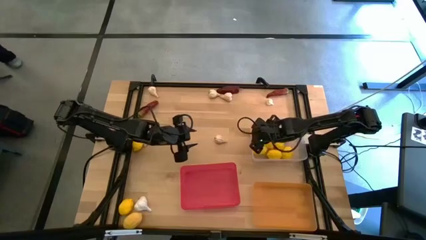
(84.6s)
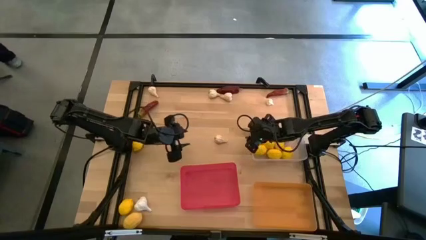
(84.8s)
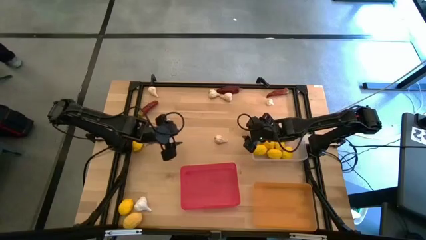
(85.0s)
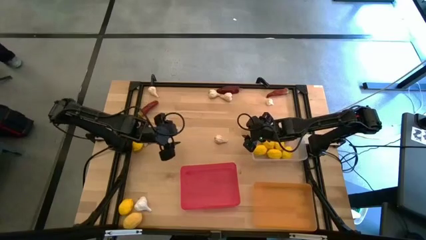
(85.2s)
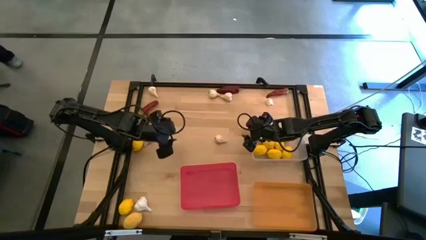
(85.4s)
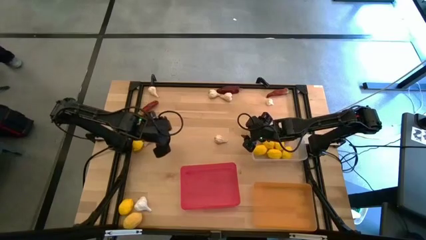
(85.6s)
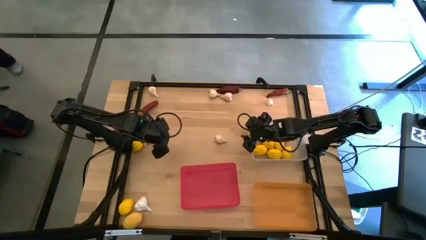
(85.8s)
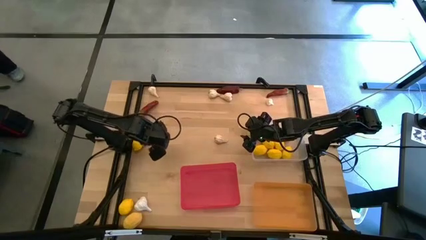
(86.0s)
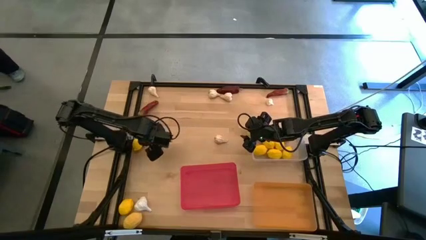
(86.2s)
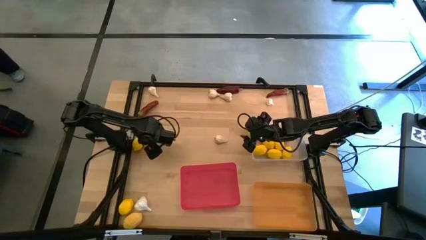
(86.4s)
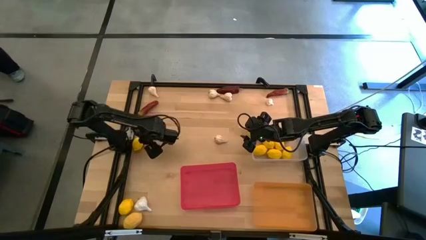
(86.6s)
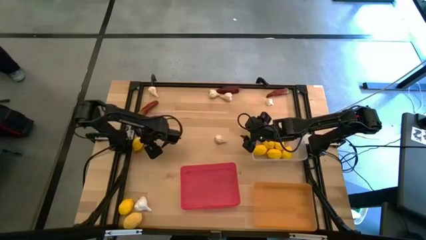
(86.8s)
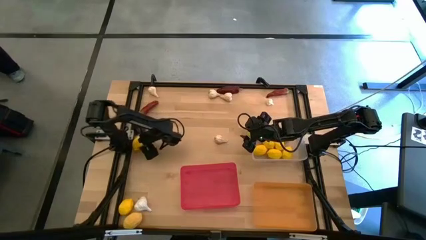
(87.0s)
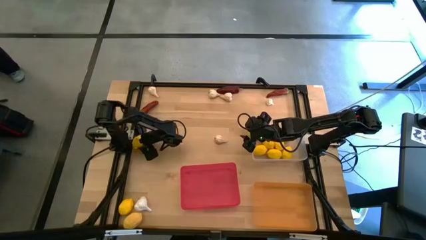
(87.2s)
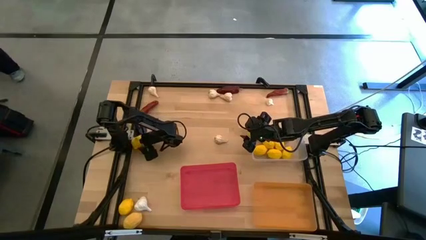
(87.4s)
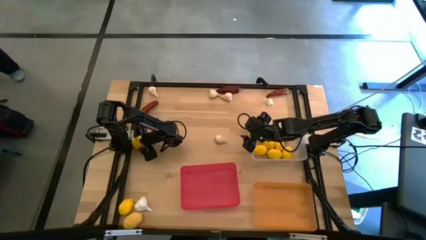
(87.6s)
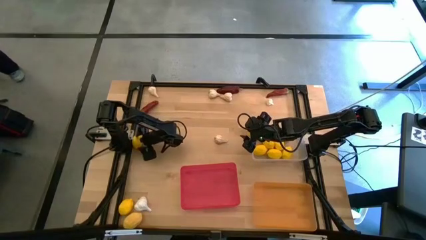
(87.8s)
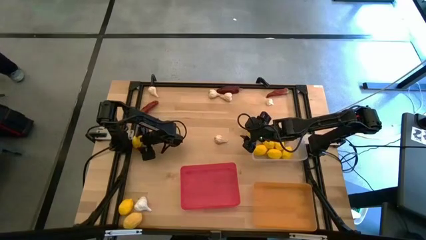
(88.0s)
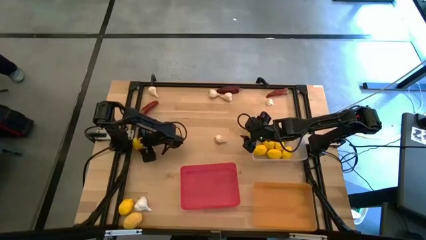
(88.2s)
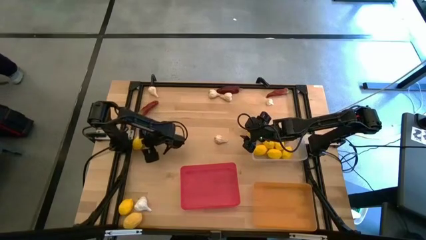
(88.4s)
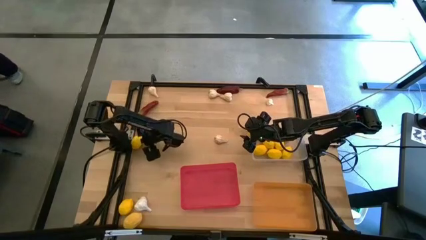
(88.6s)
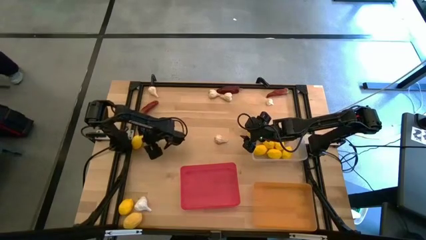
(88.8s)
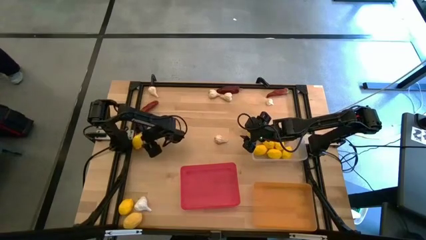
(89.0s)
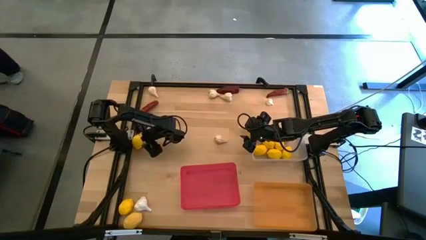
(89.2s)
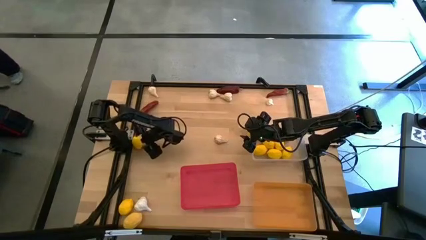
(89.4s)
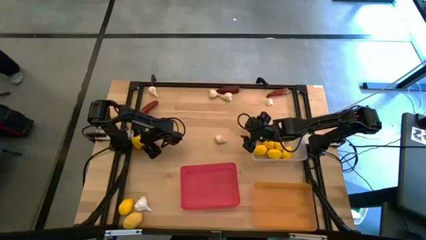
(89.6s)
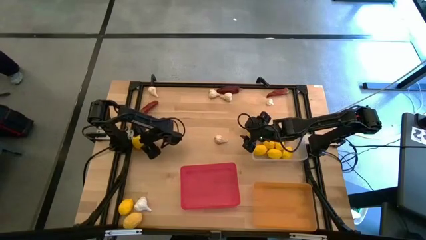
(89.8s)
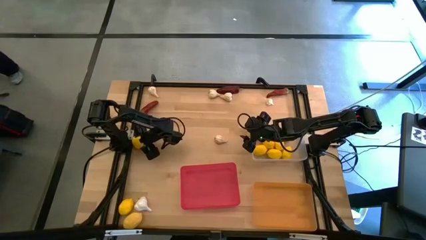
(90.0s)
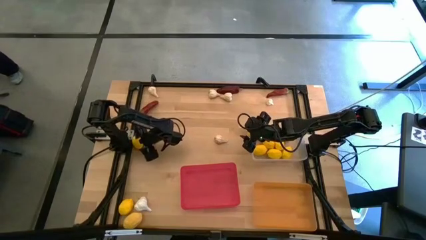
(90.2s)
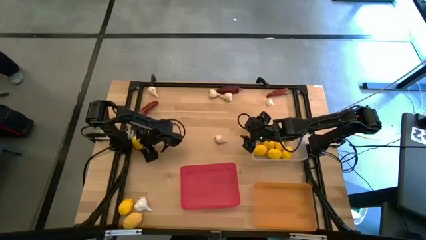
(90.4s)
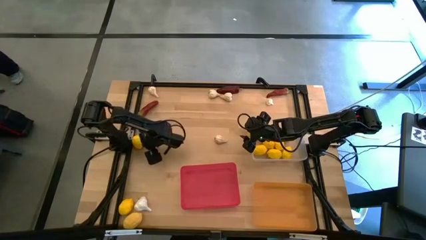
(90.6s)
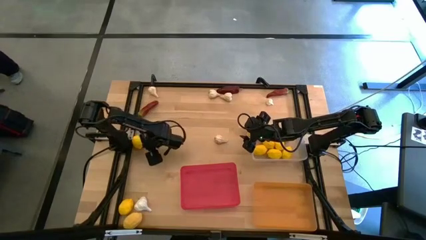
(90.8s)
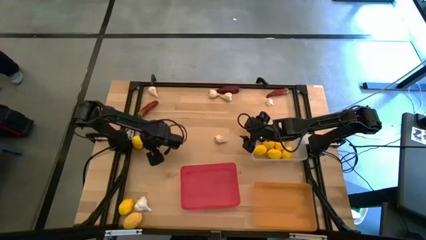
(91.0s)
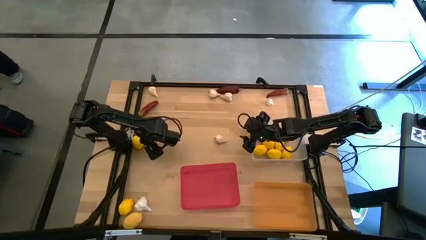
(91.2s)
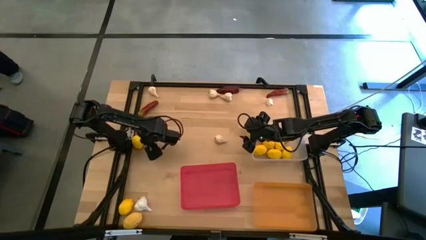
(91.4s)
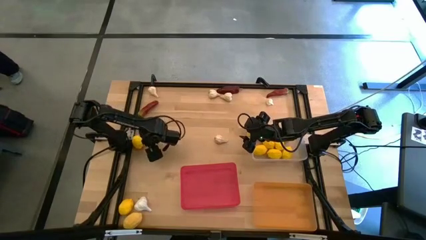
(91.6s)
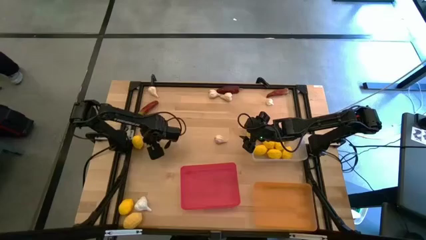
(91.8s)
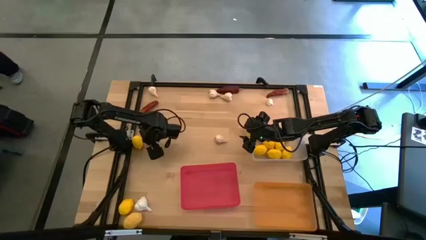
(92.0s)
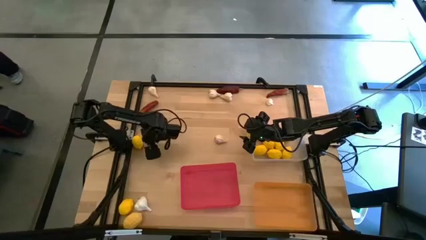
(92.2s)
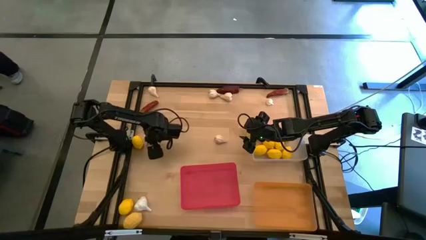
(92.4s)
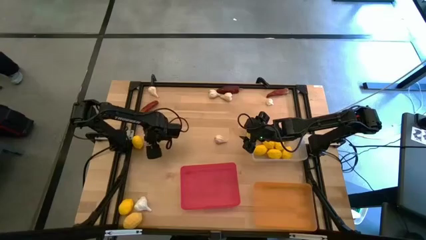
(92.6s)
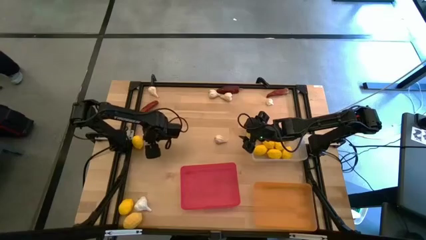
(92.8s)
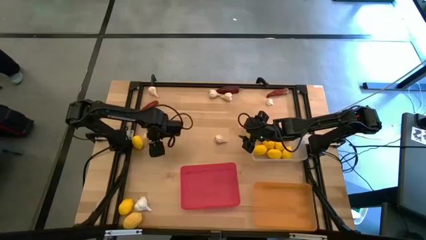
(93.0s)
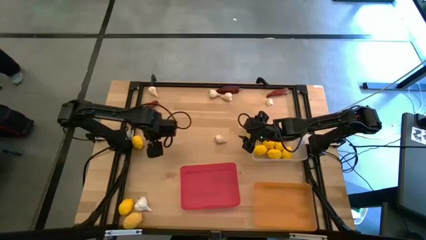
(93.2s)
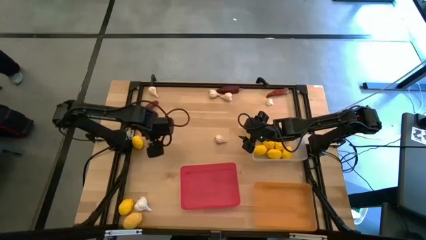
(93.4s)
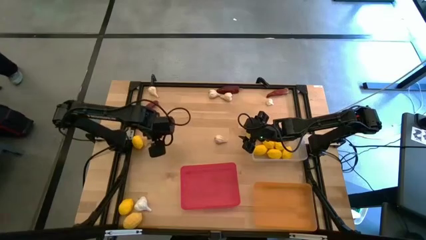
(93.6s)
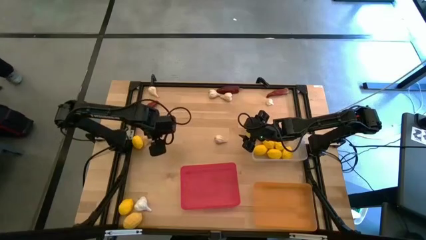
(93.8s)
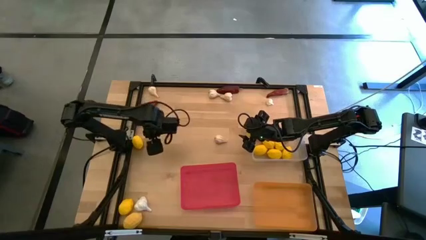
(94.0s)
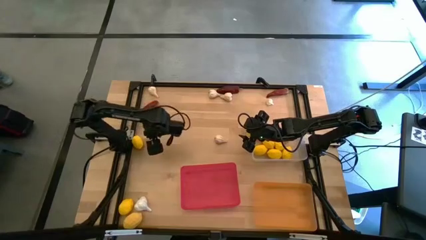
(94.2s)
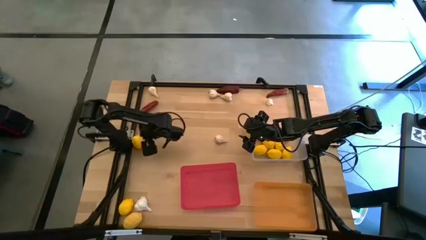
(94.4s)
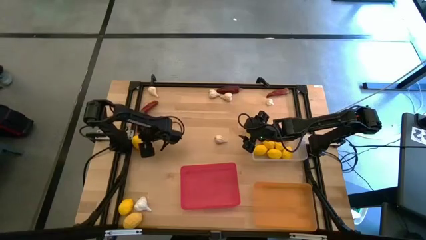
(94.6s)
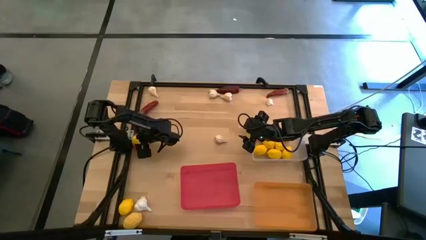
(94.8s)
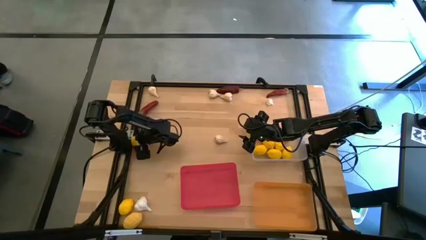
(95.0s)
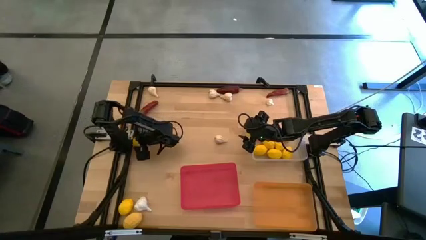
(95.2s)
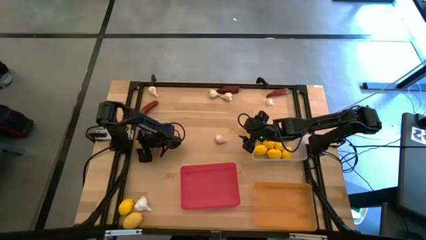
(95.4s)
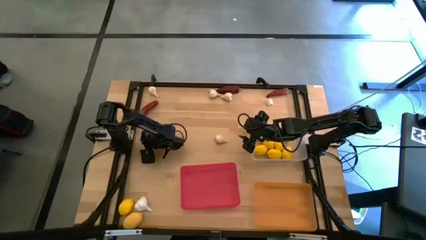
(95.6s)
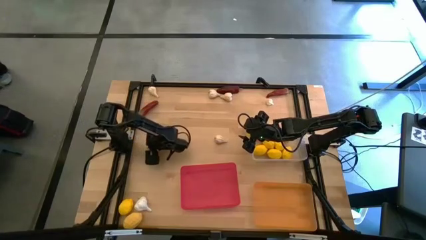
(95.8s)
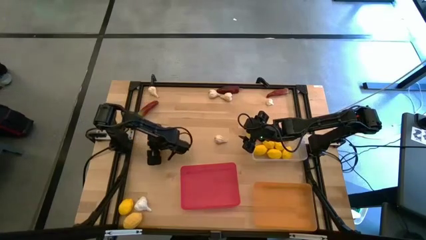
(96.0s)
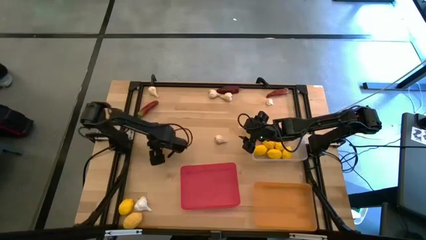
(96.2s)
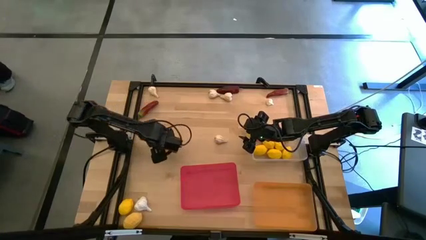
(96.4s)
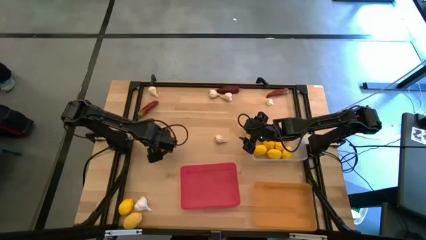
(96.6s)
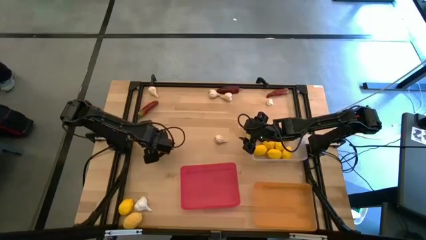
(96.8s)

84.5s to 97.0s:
Task: Sort produce into baskets
Put the yellow lemon into the transparent bin

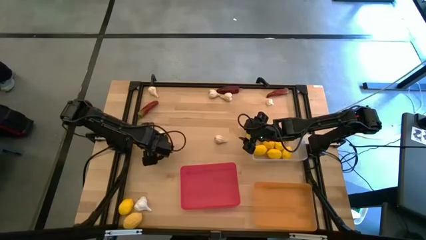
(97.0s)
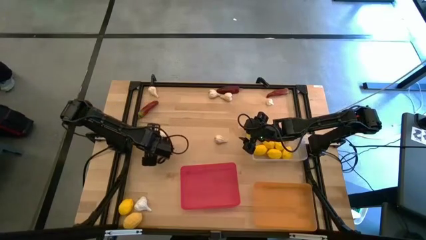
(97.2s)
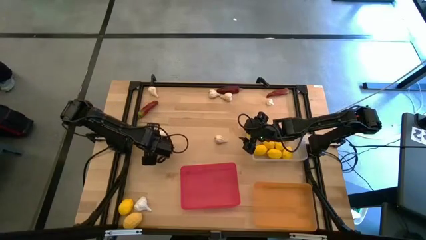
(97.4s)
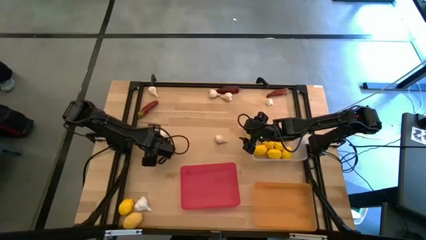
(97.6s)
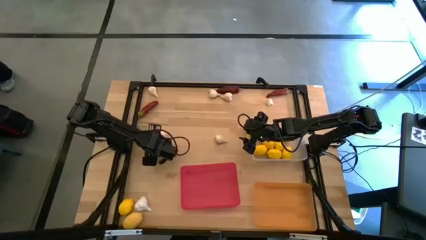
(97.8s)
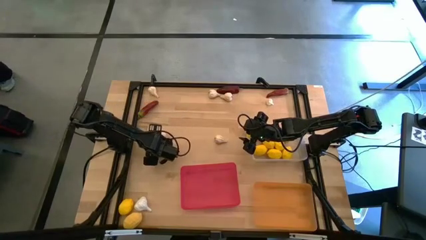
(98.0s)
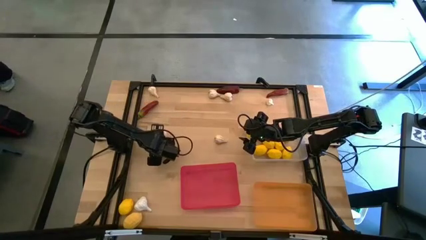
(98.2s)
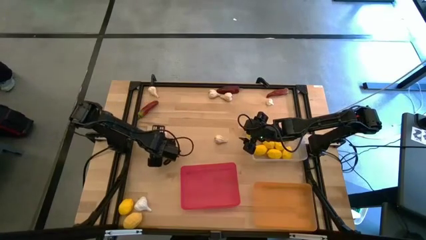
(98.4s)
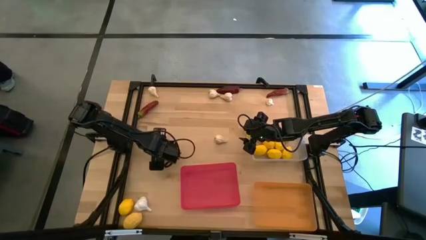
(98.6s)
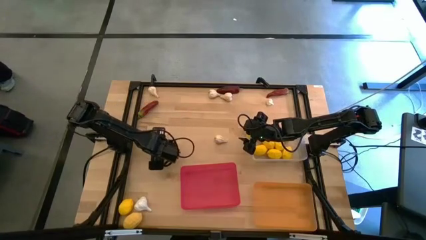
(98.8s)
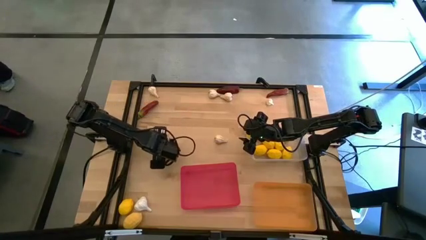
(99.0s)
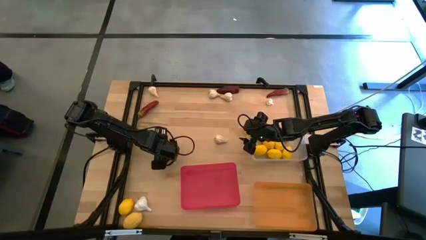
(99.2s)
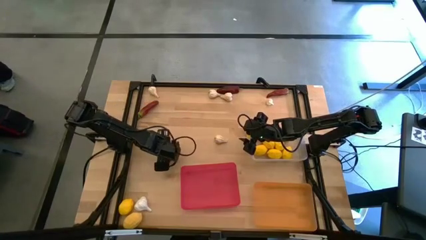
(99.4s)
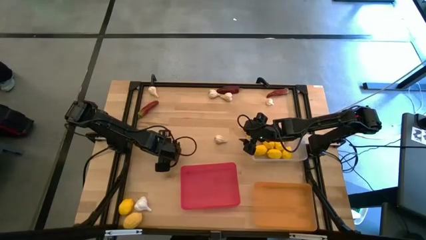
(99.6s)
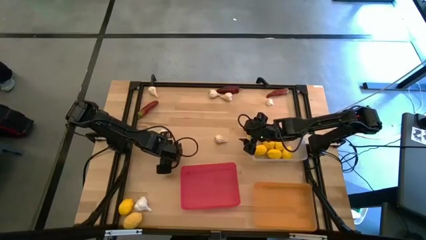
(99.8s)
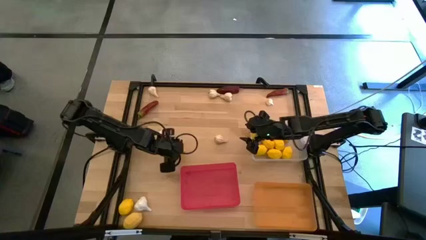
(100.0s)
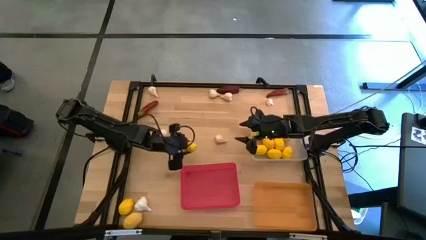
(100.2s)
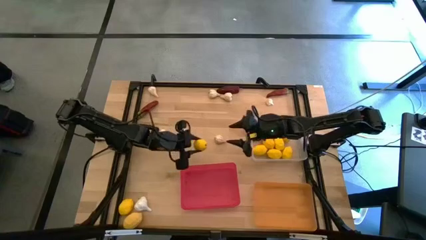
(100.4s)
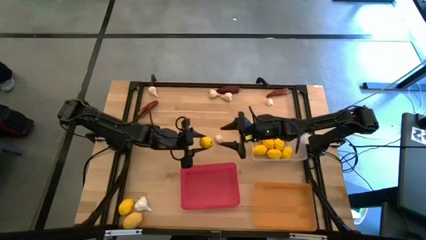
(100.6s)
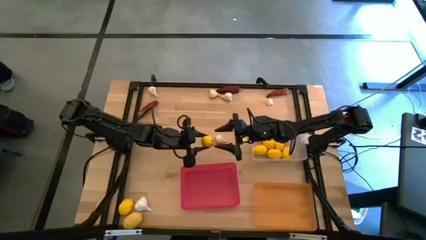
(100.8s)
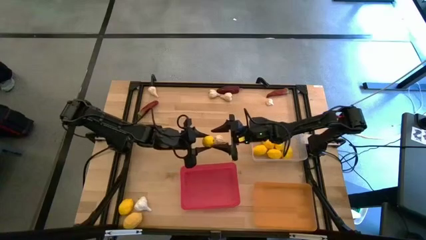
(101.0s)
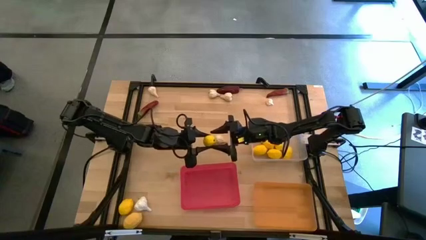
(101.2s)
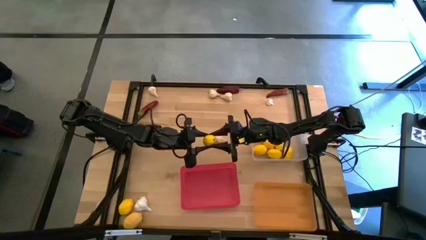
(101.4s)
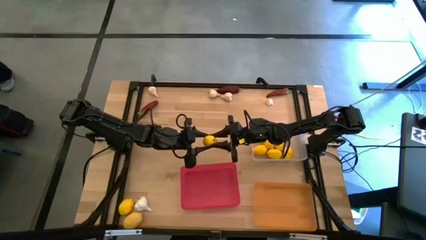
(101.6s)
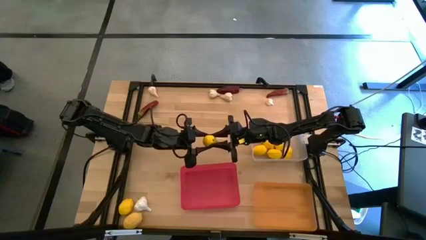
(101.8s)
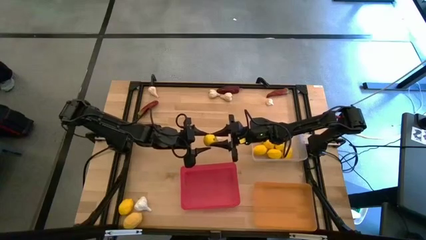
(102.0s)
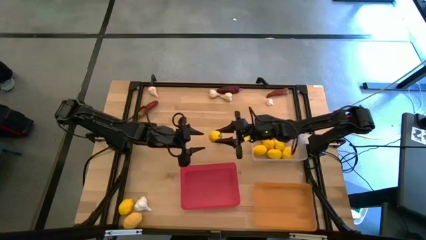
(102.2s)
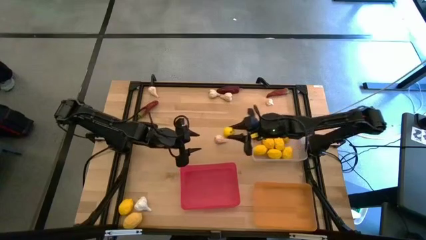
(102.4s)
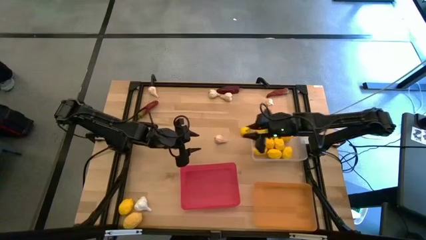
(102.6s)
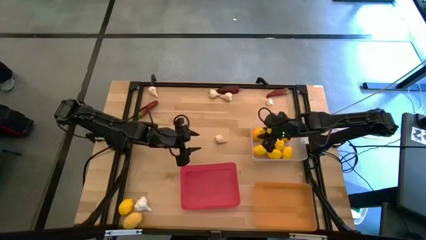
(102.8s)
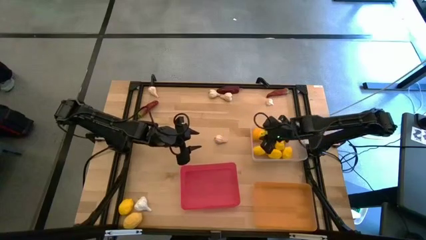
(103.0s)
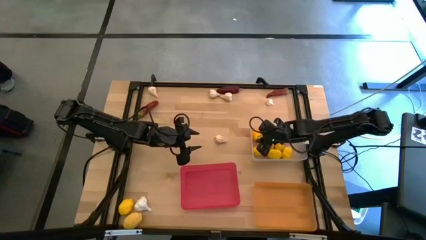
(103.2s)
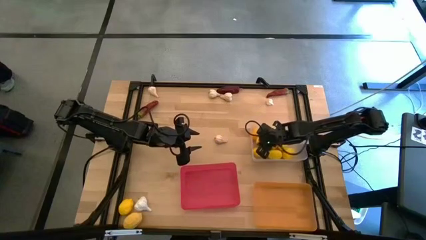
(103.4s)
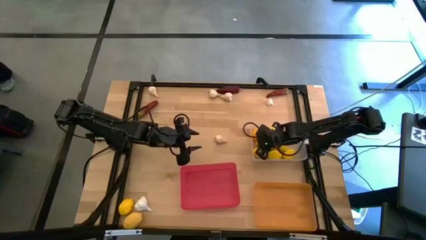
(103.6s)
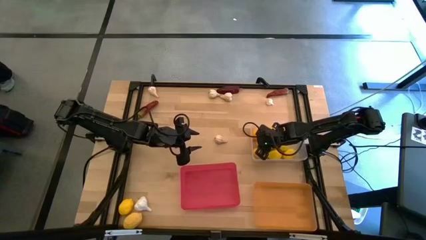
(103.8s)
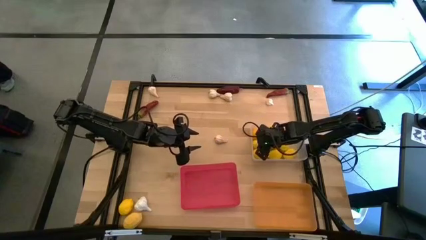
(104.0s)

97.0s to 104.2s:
Put the yellow lemon into the transparent bin
